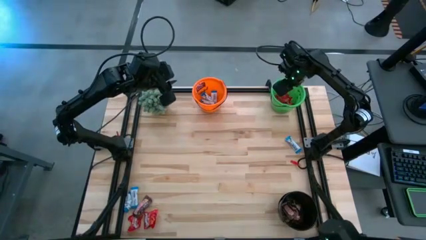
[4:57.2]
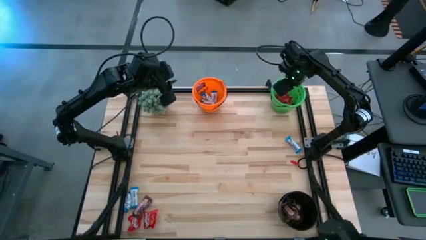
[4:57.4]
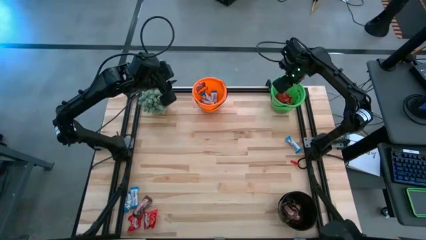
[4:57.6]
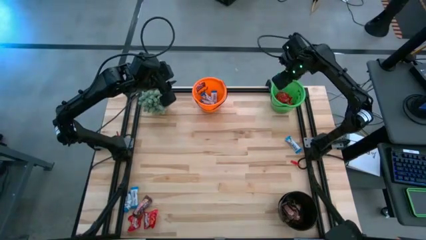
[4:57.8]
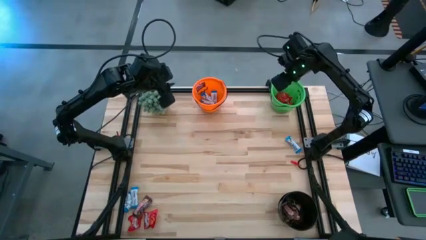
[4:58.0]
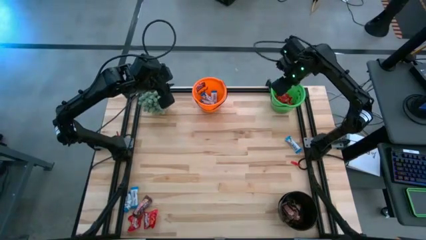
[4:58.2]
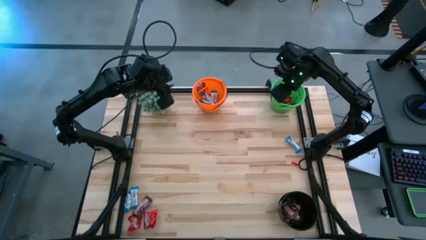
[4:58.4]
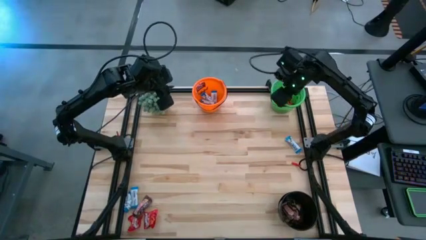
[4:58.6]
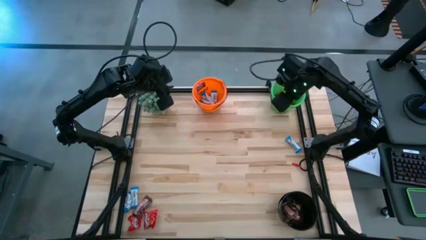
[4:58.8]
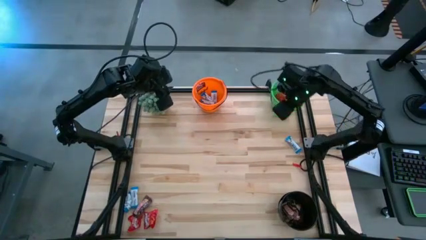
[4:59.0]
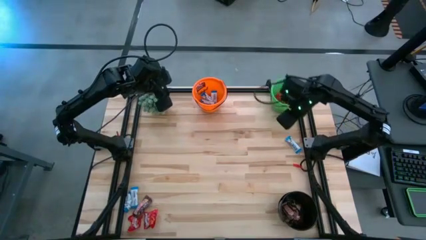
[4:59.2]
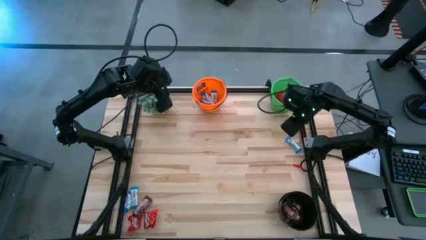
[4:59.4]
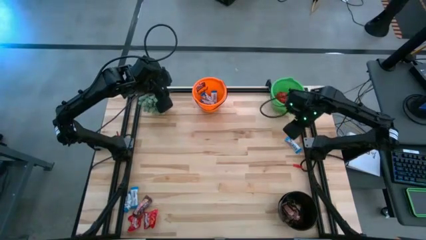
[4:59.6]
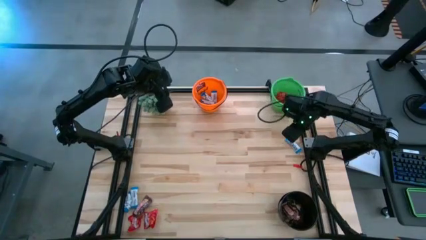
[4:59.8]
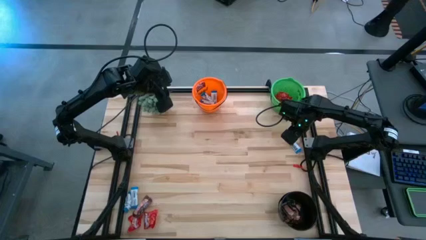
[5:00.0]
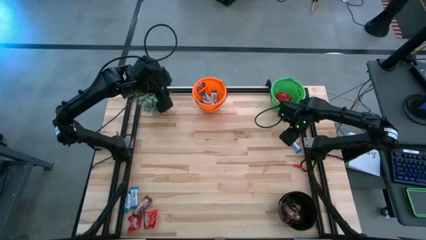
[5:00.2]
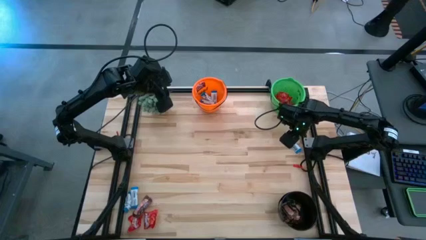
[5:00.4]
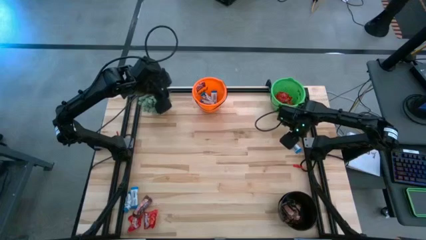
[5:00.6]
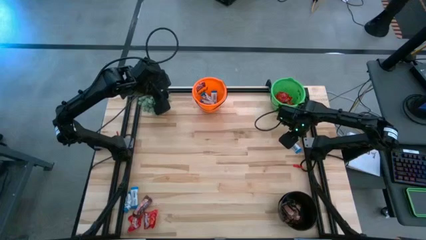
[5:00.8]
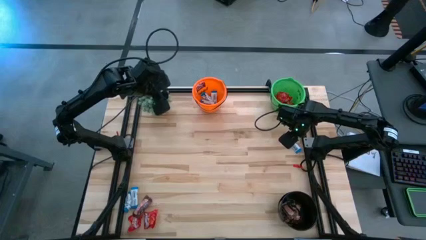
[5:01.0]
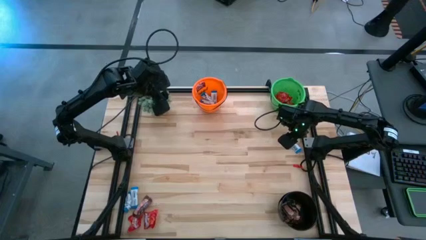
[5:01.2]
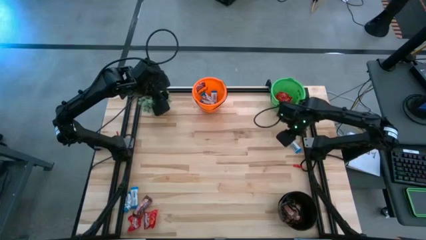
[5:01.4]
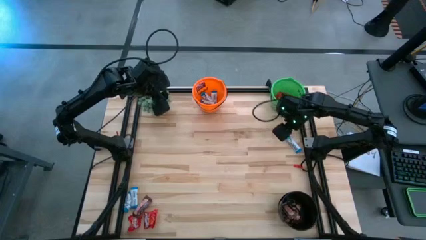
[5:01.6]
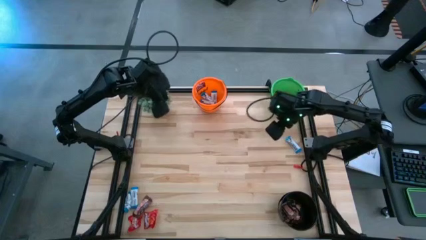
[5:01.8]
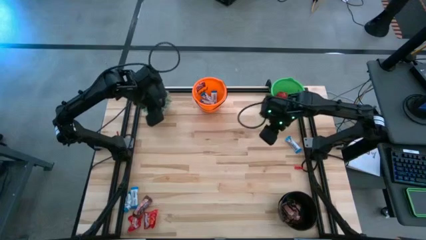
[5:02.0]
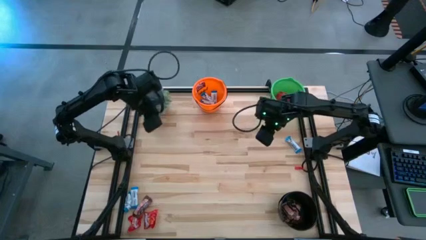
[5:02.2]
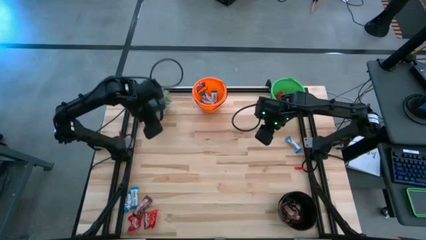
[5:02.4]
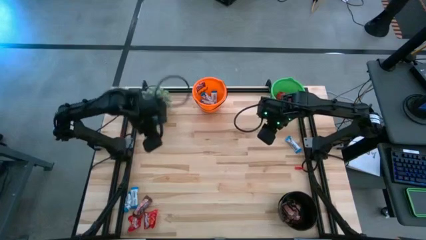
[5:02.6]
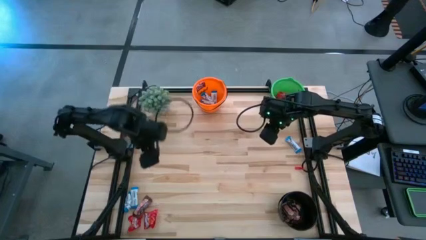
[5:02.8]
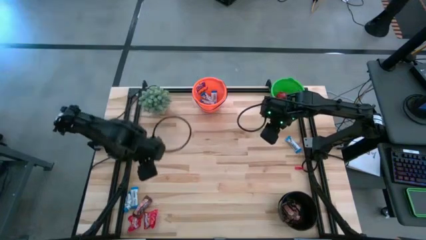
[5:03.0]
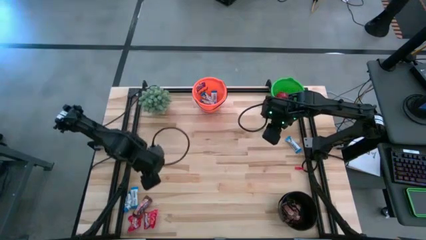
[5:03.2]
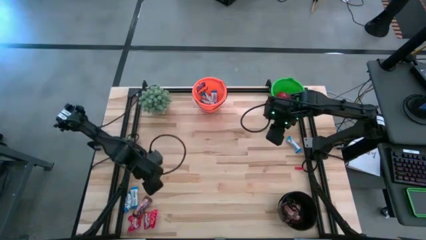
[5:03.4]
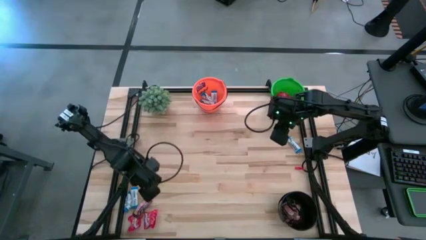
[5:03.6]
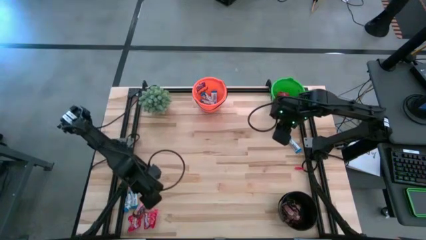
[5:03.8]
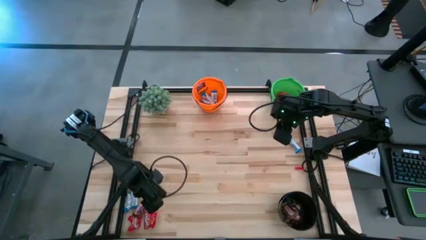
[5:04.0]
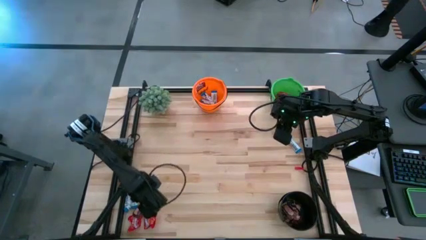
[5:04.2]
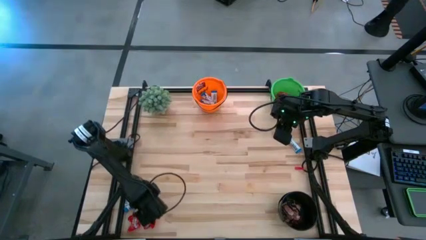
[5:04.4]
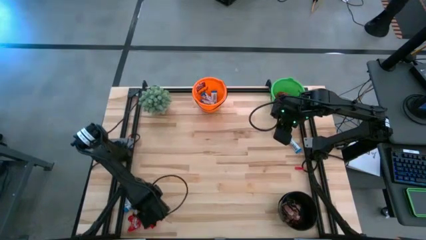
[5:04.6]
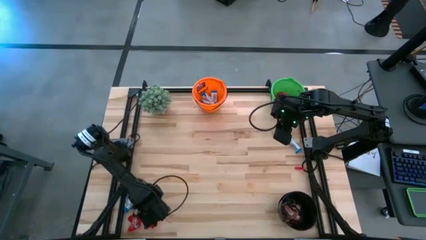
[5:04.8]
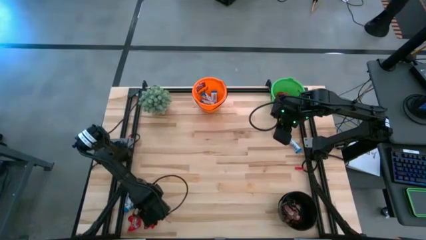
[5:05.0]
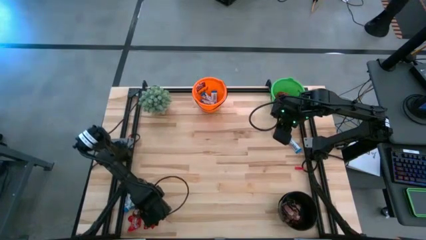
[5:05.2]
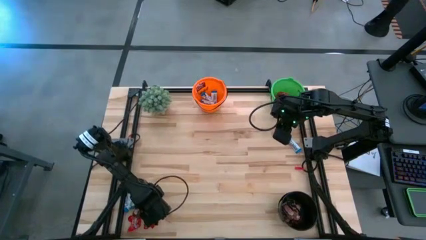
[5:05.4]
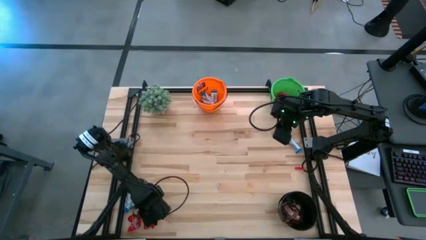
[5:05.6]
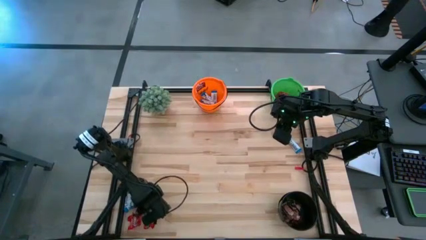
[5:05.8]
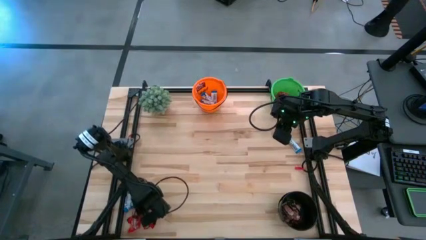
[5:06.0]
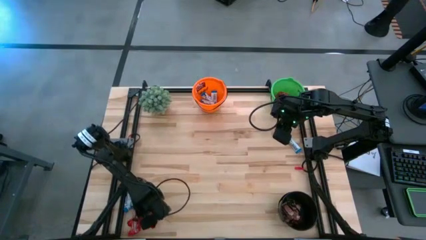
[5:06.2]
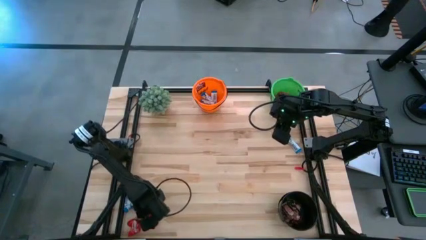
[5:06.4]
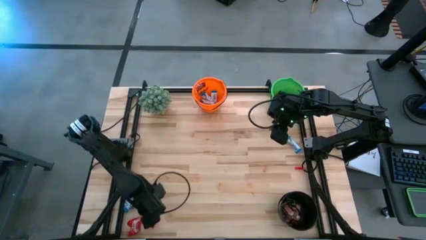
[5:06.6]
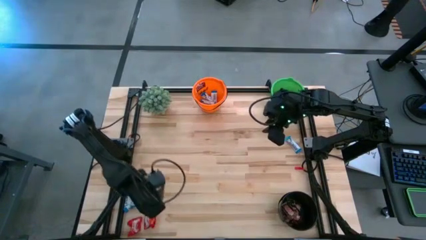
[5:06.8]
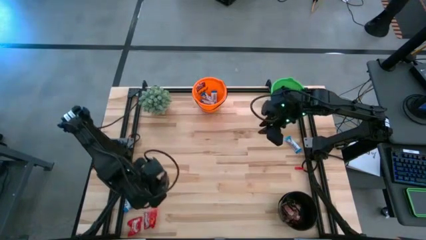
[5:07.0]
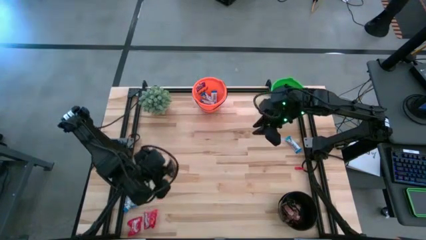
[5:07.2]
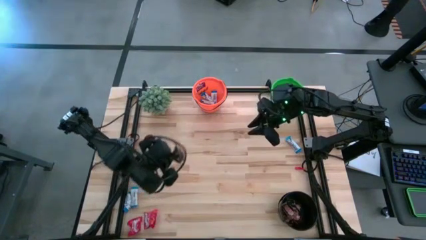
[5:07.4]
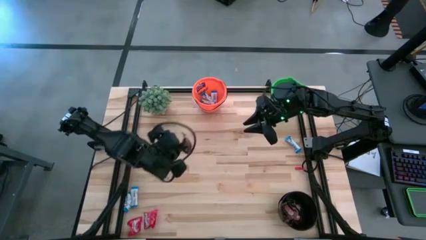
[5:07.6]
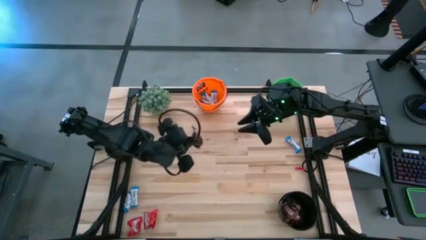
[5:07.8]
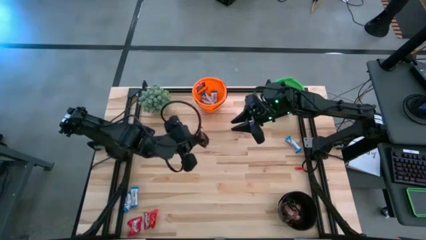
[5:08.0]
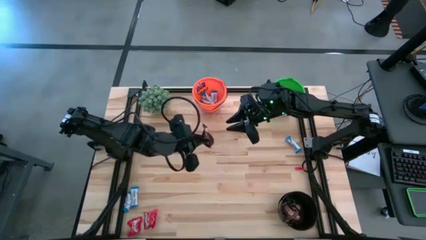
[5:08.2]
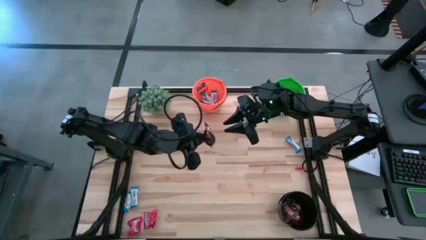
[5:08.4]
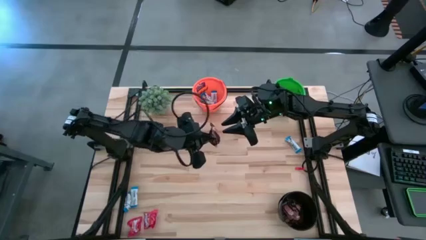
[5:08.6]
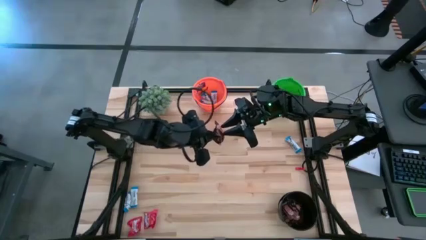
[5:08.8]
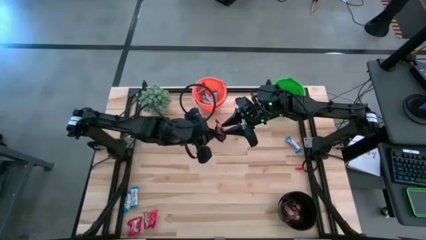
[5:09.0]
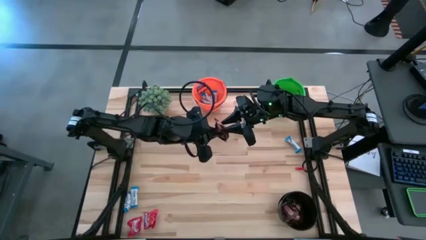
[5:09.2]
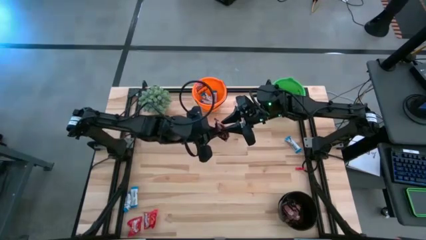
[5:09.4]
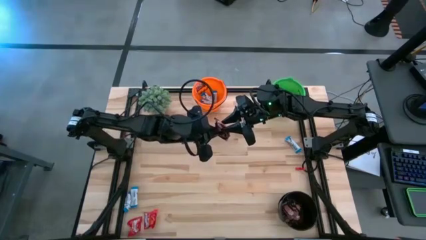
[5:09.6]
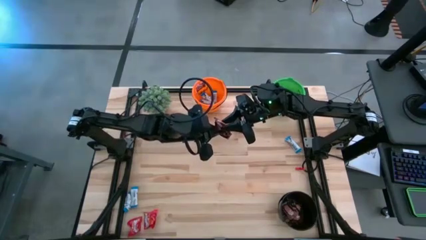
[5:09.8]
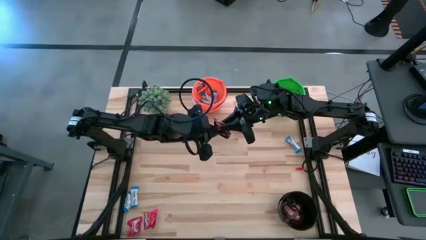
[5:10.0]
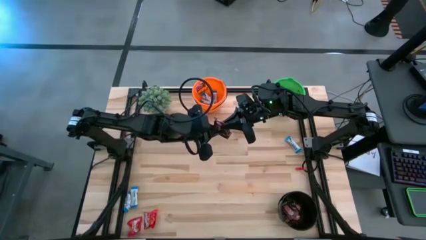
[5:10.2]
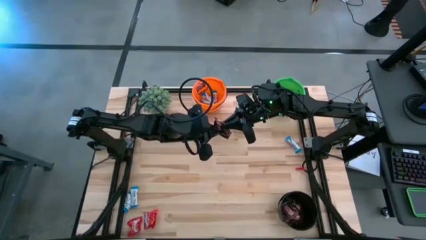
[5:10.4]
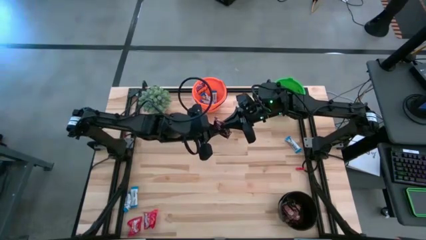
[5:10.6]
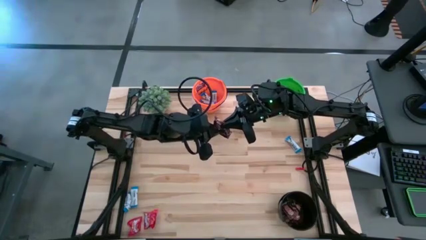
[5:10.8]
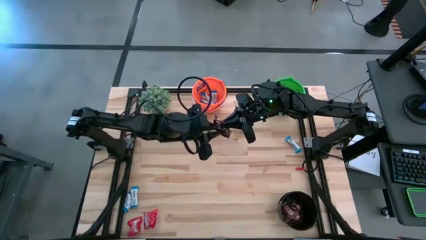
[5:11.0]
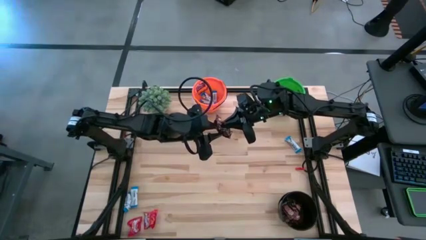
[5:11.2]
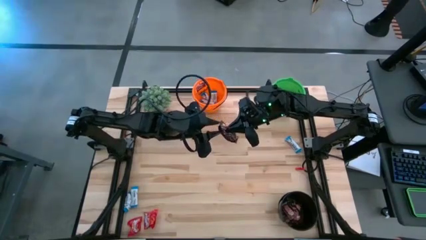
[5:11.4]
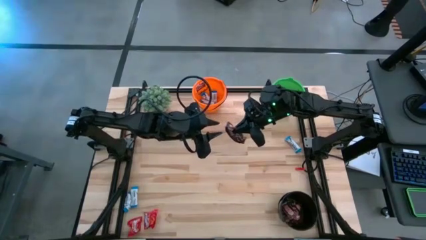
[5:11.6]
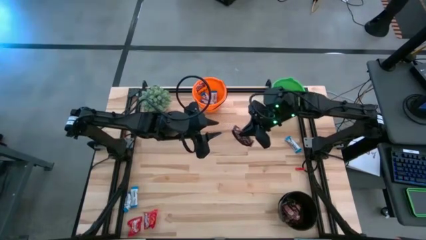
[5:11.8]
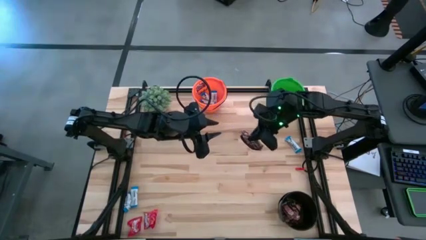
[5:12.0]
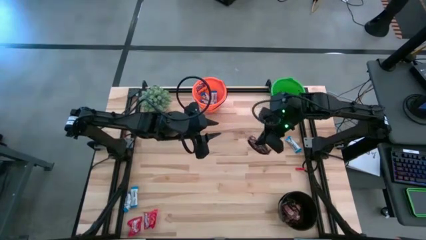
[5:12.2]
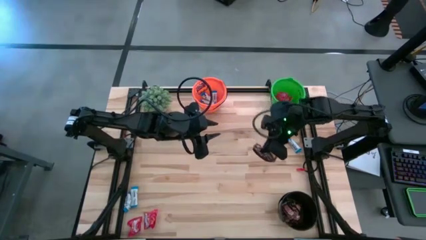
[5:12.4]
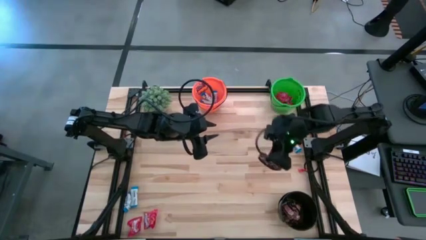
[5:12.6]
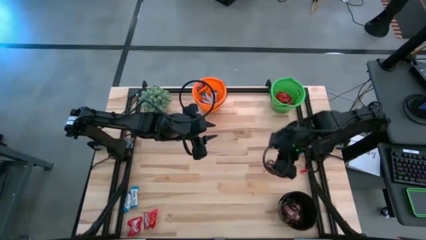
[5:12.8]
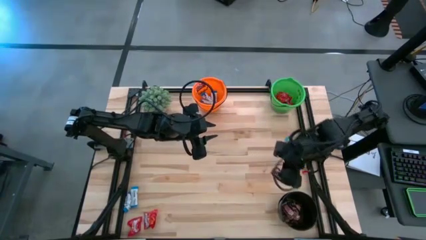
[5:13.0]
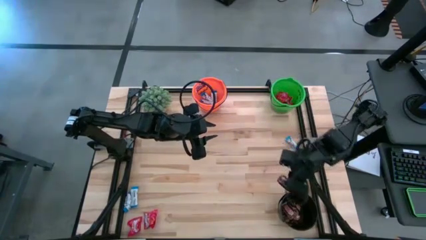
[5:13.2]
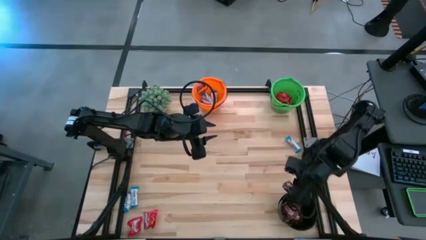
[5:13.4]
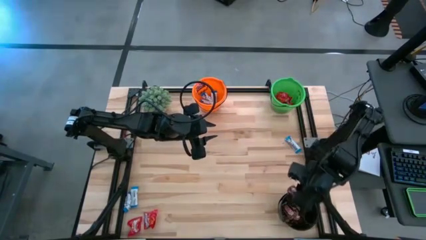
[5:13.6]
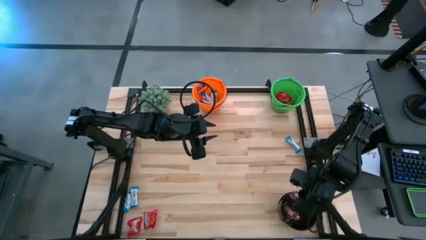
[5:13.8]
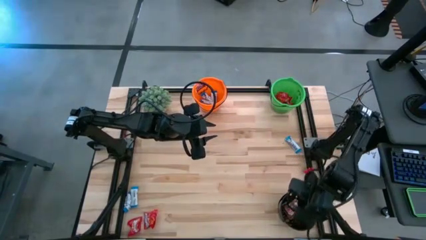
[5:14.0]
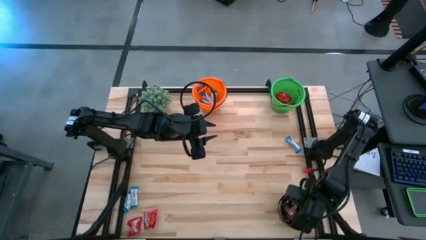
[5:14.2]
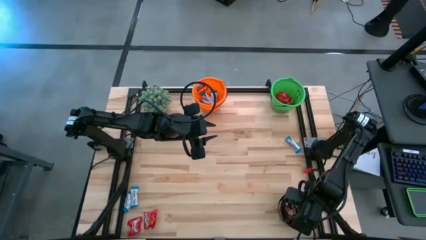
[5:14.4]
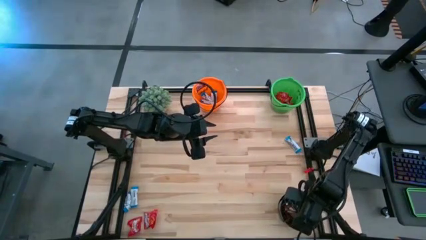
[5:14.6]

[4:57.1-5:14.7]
Task: Organize candy in baskets
Put the brown chocolate bar into the black bucket
